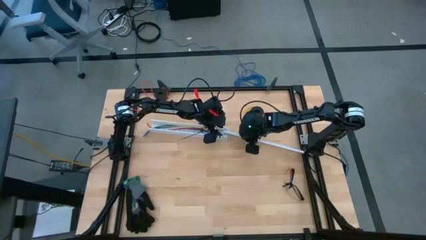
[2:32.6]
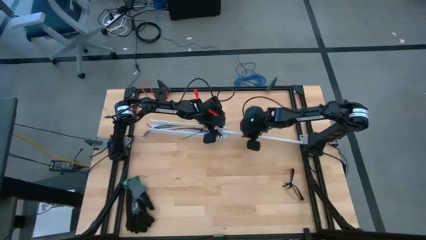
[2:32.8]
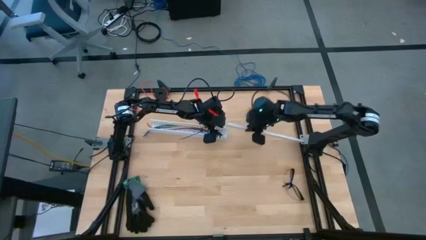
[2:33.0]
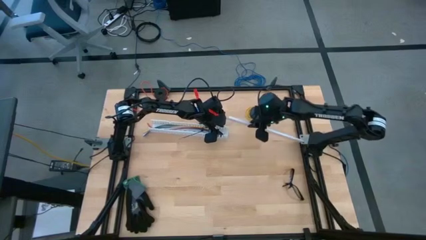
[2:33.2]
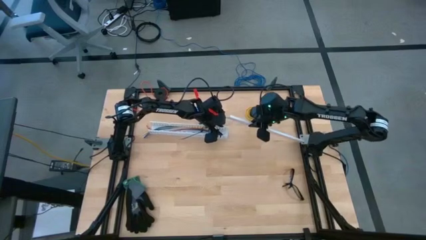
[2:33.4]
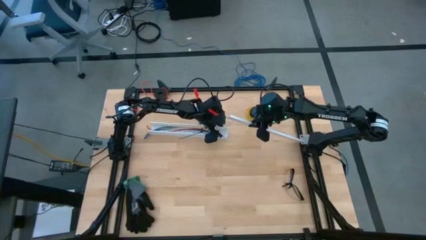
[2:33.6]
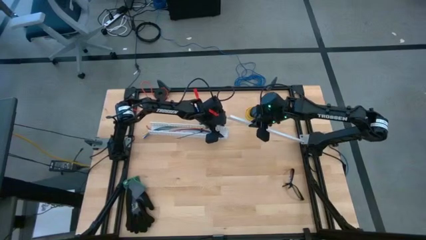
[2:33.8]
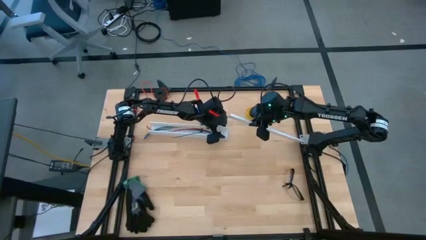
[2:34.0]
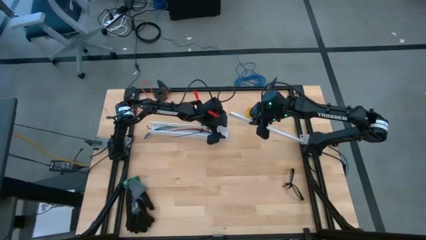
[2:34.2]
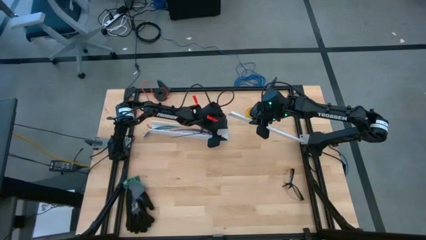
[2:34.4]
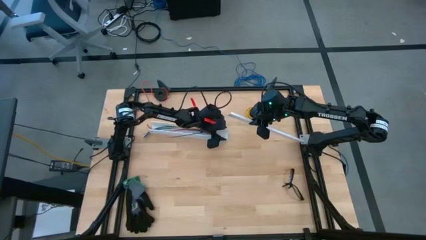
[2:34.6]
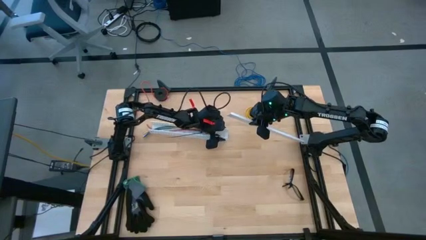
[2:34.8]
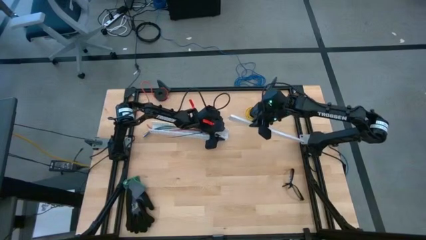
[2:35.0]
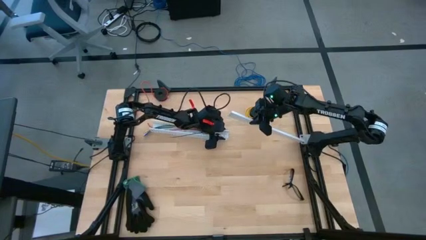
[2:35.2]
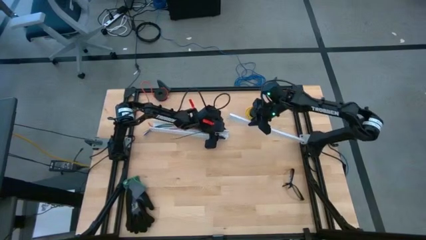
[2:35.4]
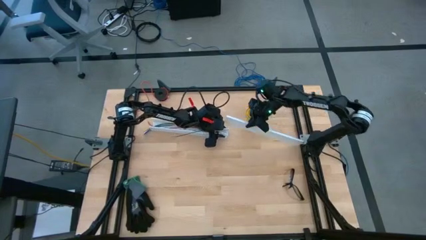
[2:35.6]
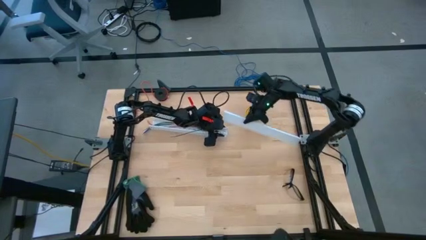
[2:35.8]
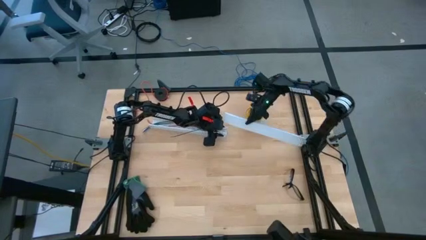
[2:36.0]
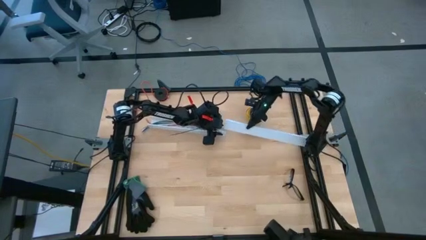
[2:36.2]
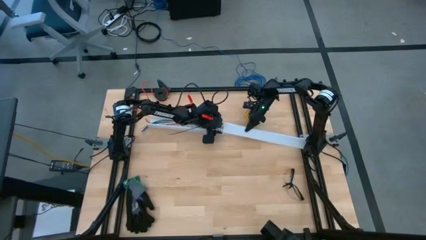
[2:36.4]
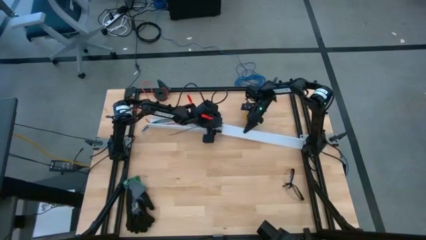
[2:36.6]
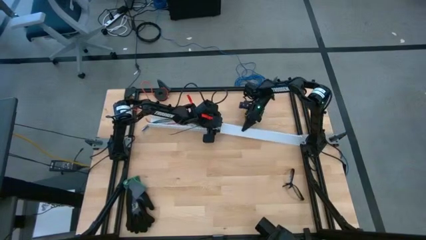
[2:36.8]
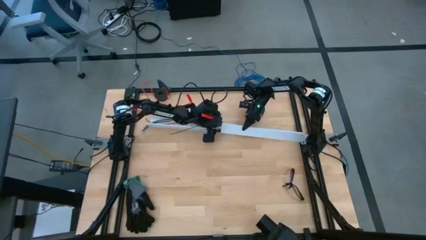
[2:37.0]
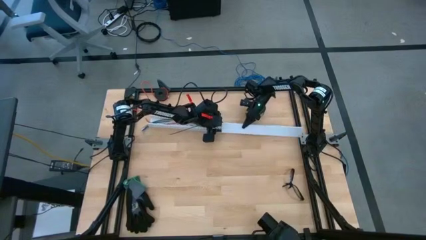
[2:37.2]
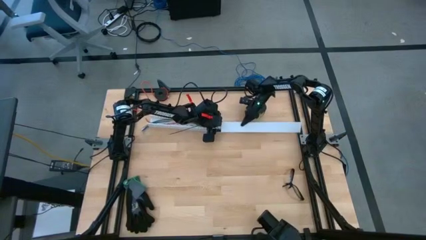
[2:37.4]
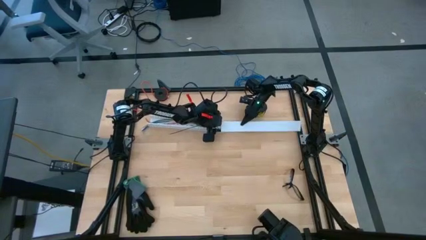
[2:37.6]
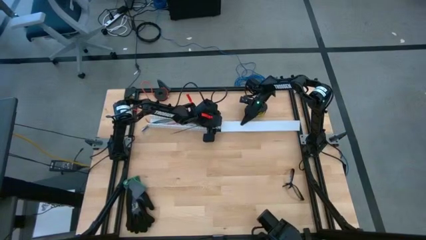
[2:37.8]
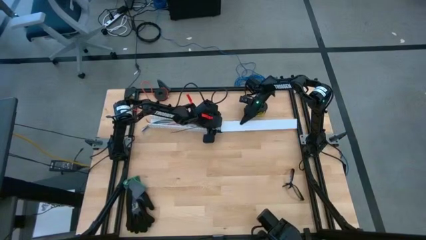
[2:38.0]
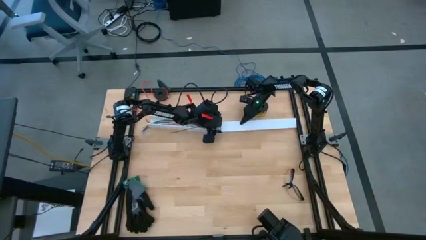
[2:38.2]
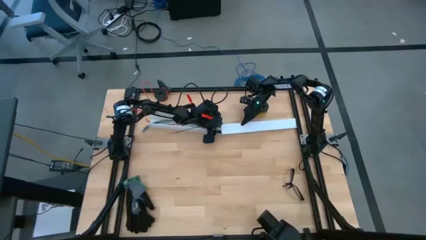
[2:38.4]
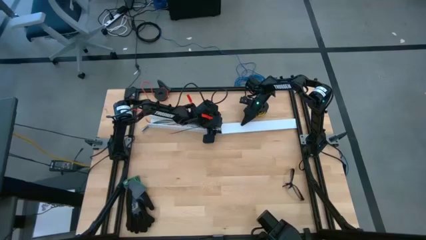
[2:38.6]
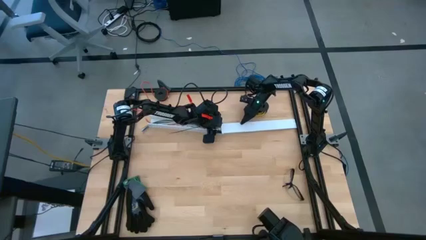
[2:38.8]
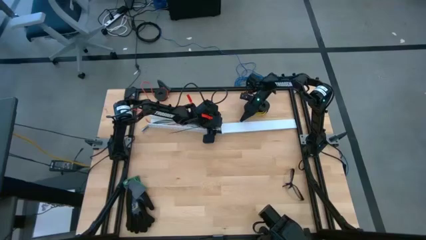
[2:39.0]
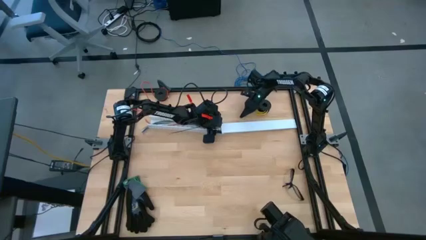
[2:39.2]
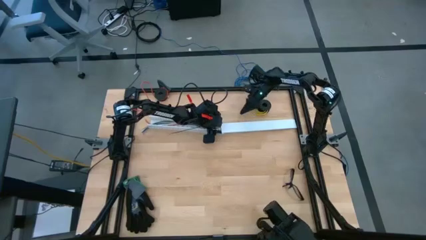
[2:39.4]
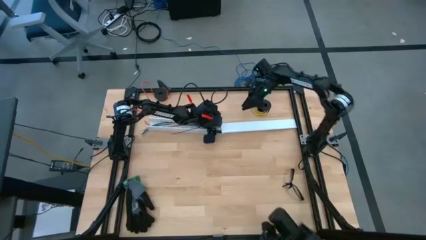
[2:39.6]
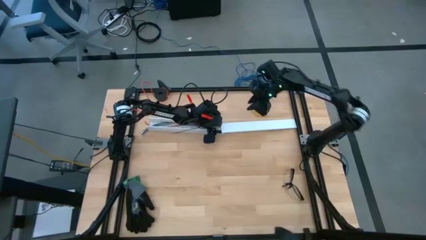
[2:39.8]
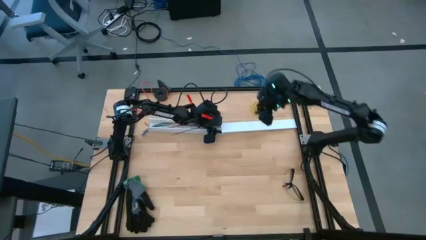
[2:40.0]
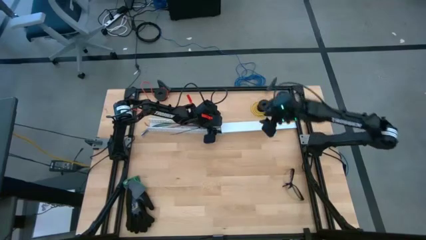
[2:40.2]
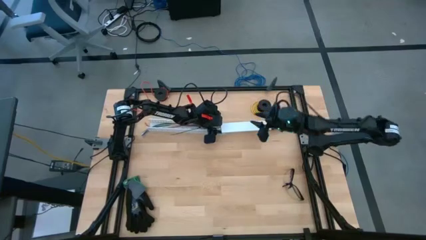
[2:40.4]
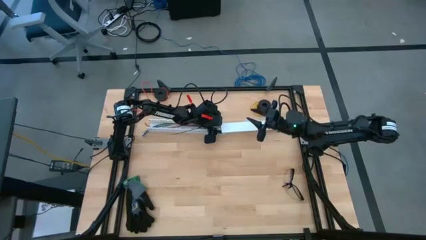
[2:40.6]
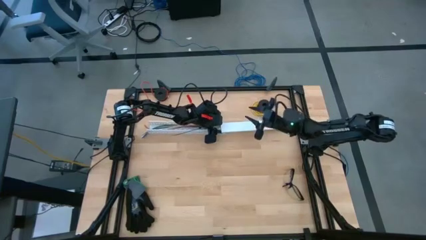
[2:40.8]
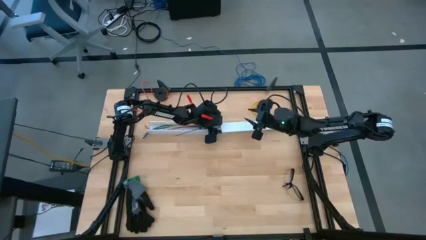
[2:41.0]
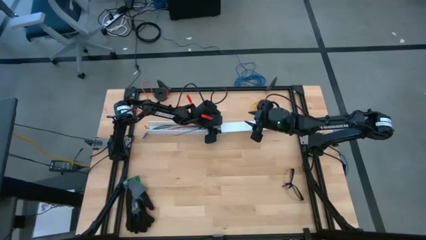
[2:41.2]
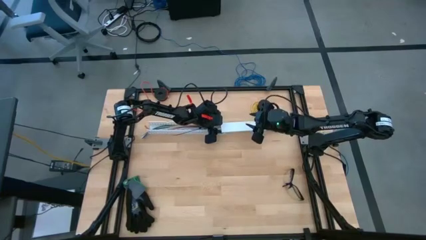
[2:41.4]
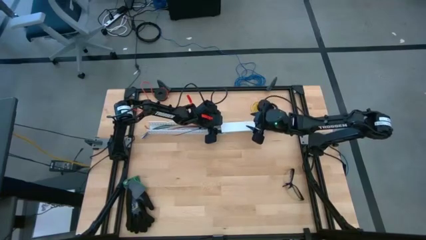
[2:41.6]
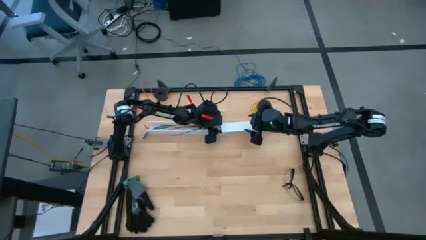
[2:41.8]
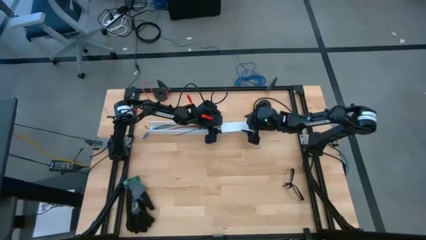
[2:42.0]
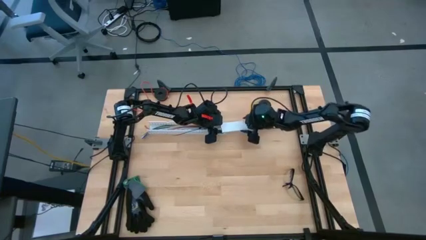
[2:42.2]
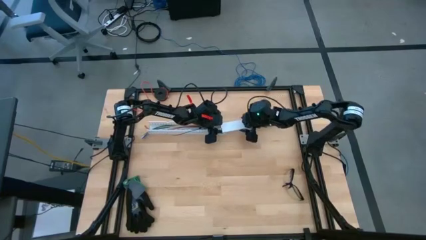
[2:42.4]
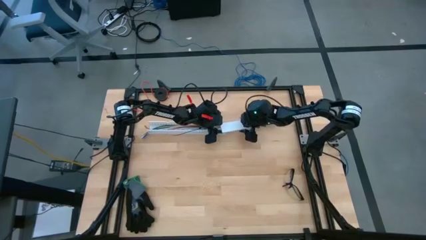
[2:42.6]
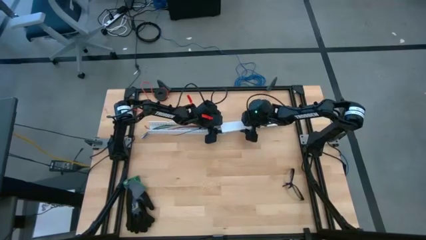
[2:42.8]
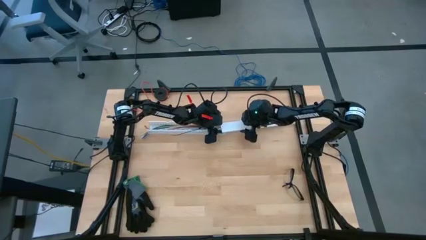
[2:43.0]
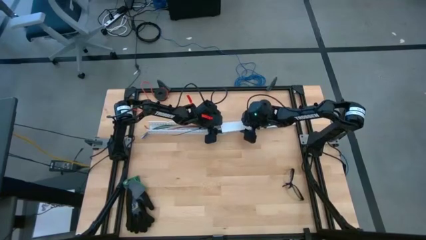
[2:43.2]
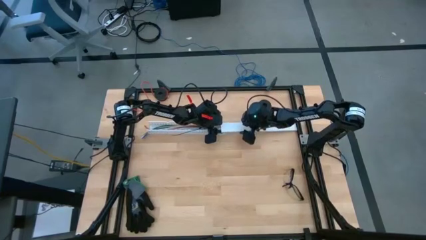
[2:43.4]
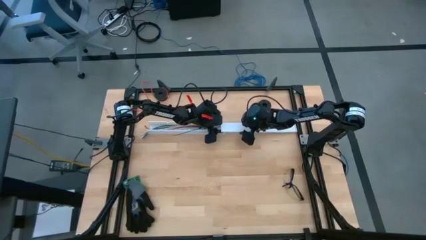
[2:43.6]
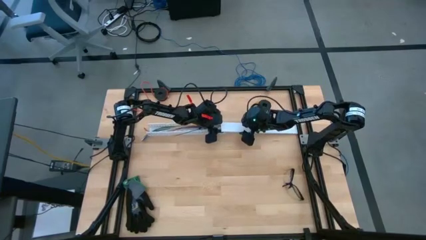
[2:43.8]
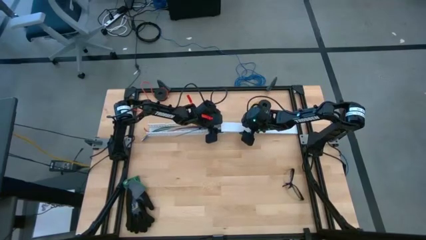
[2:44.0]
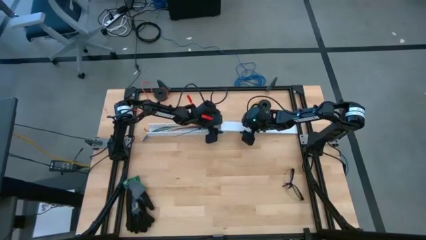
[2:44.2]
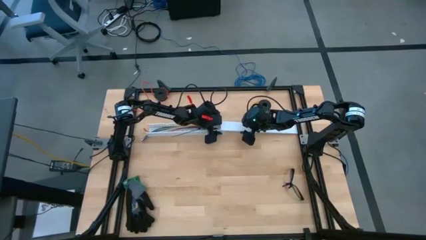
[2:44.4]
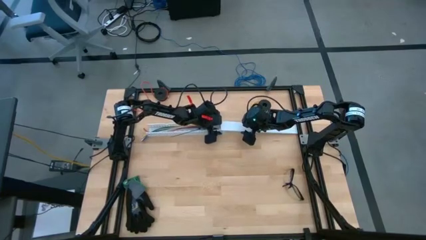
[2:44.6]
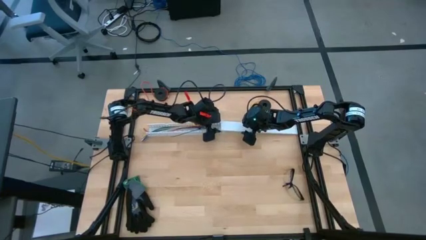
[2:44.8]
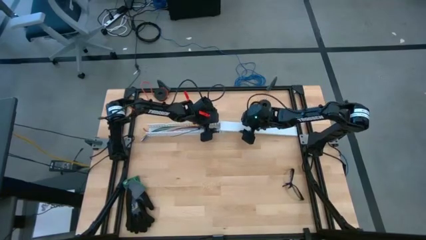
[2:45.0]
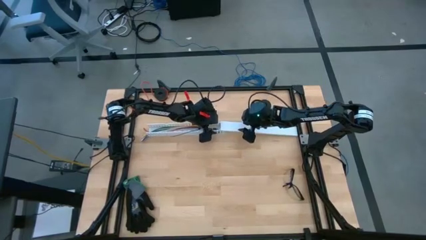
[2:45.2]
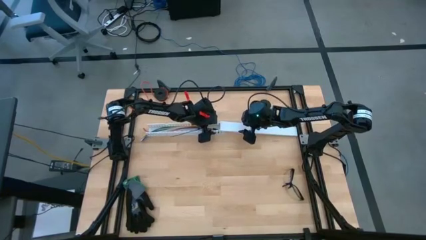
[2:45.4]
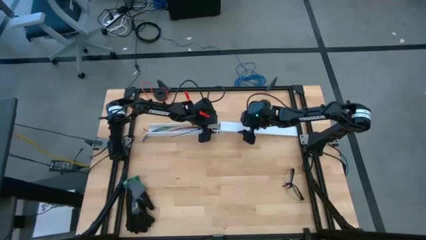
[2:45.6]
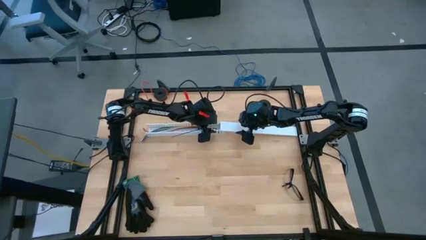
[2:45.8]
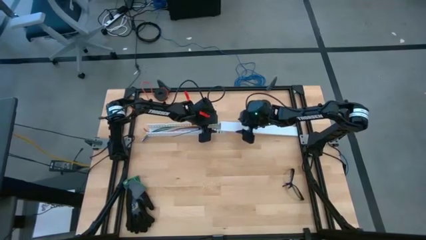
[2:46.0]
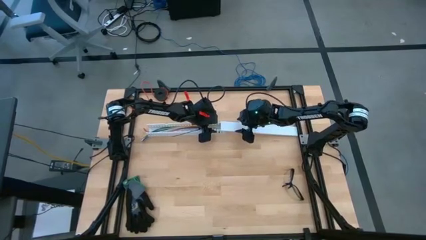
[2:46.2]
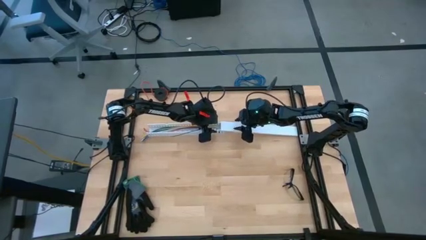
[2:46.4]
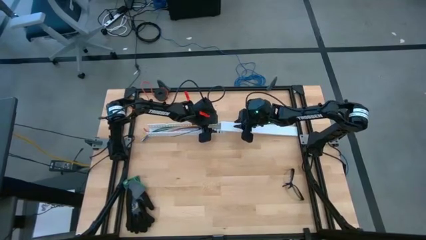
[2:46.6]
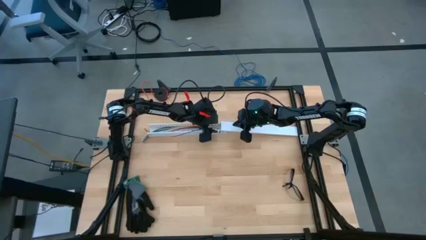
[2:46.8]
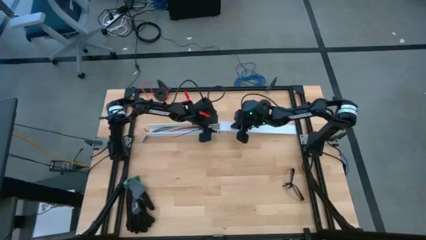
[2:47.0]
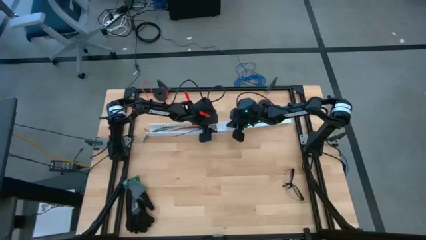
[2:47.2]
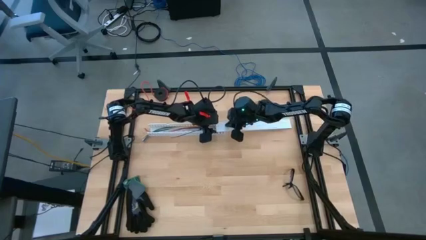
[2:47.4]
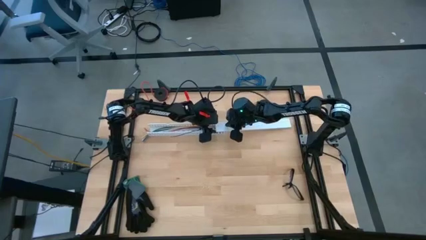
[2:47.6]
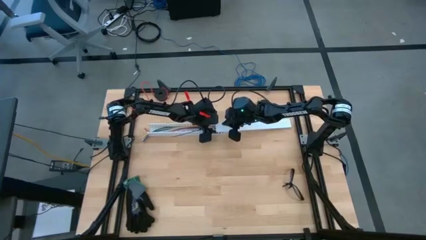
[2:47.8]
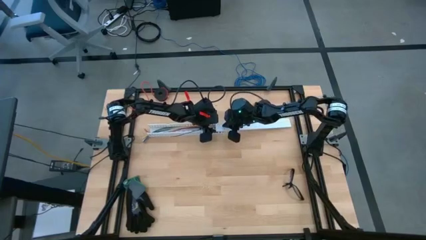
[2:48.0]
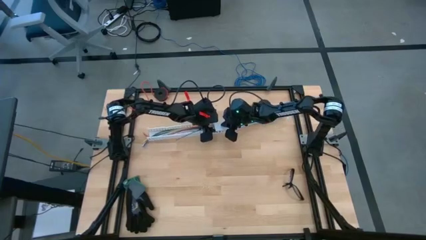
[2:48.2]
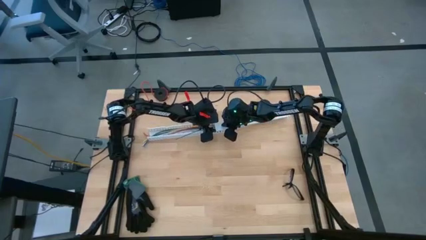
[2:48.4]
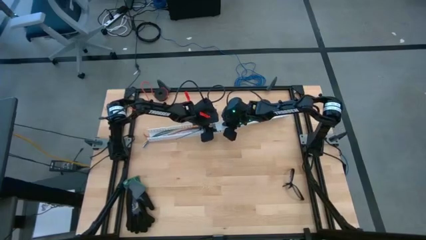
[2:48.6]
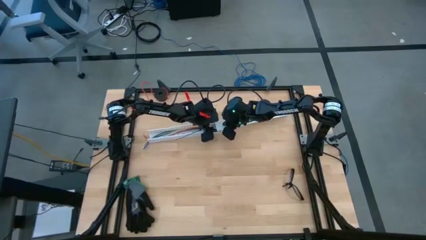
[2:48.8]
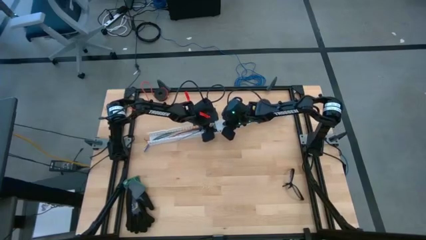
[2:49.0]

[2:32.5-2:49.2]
Task: Ziptie cables
Close the white cable duct
